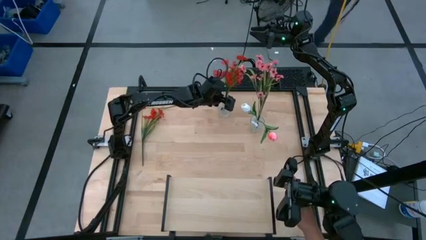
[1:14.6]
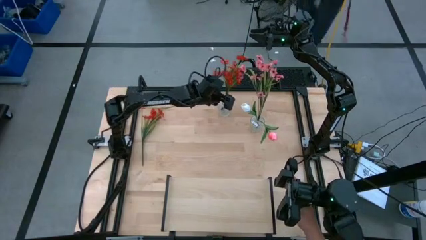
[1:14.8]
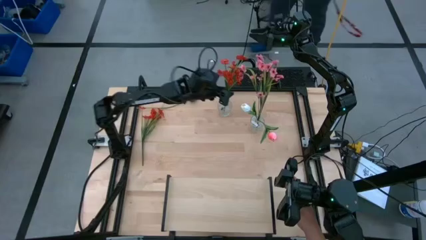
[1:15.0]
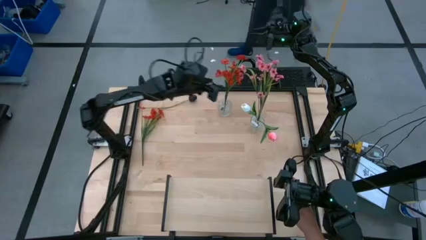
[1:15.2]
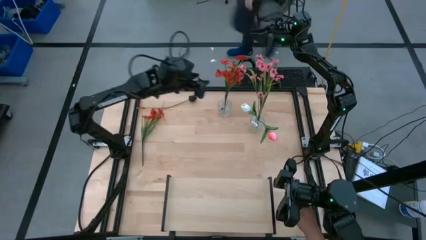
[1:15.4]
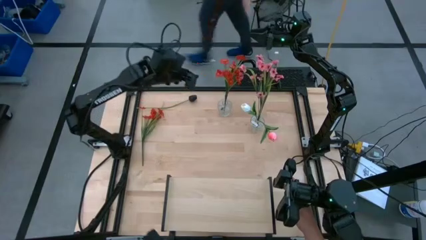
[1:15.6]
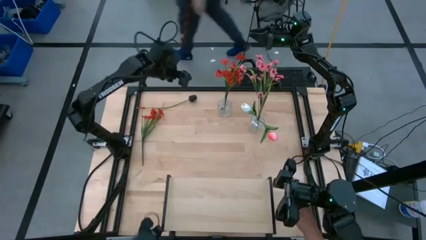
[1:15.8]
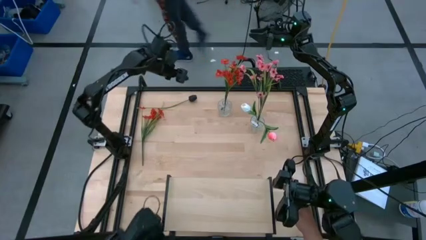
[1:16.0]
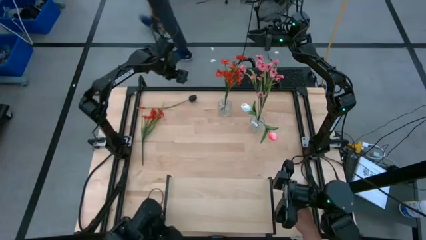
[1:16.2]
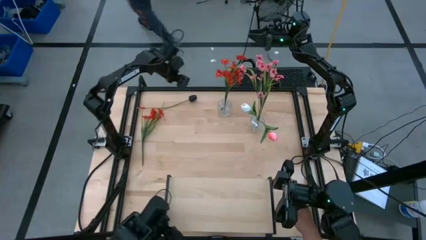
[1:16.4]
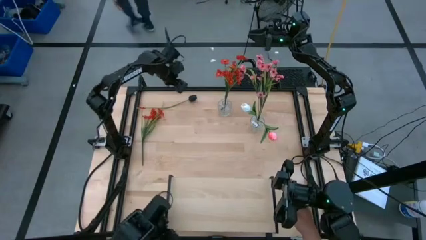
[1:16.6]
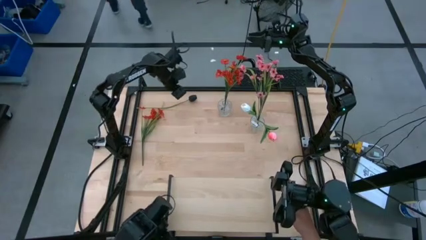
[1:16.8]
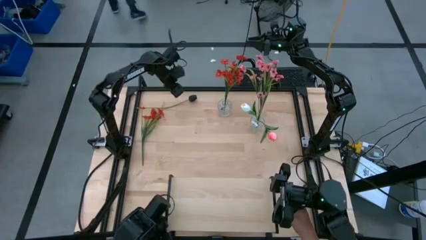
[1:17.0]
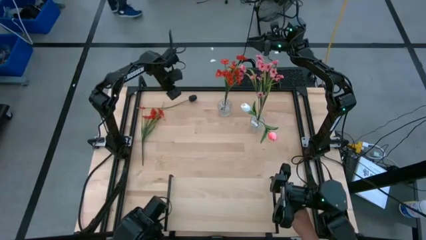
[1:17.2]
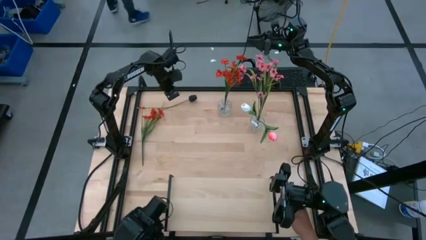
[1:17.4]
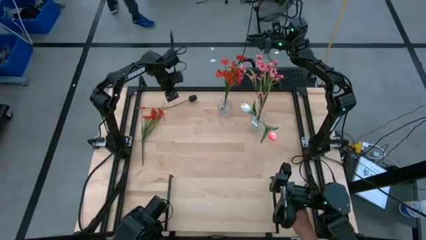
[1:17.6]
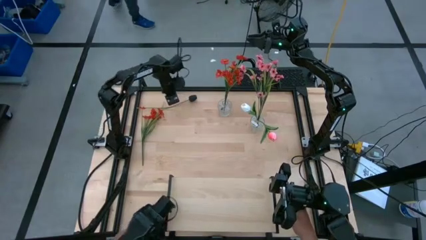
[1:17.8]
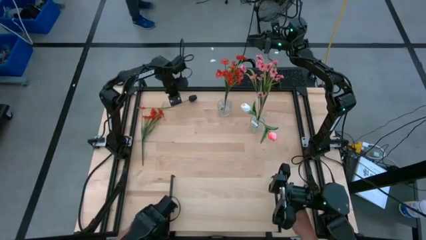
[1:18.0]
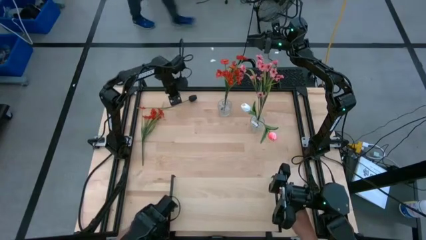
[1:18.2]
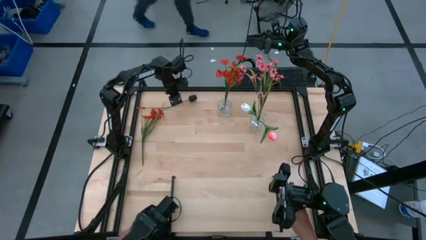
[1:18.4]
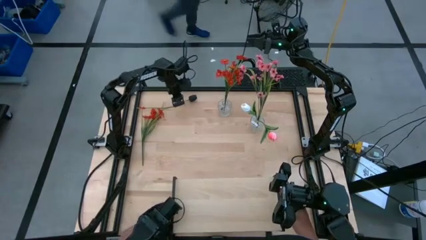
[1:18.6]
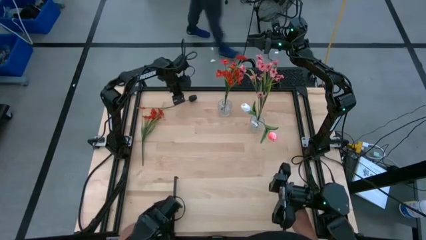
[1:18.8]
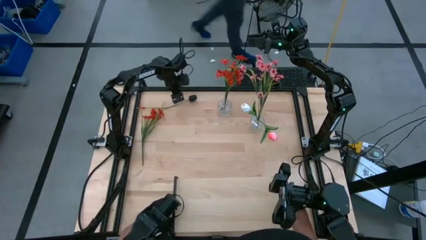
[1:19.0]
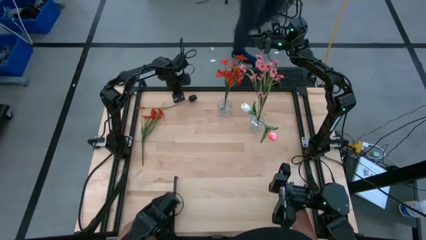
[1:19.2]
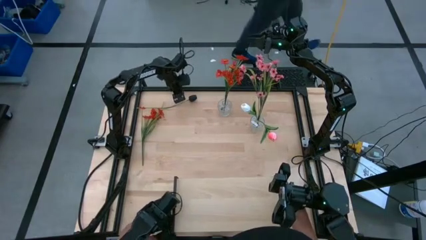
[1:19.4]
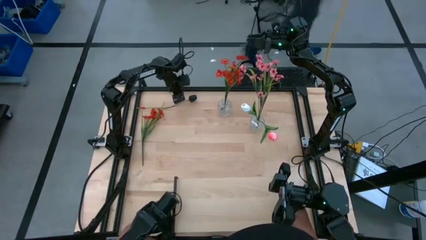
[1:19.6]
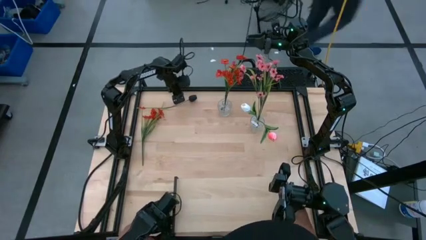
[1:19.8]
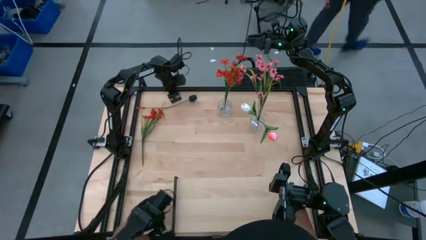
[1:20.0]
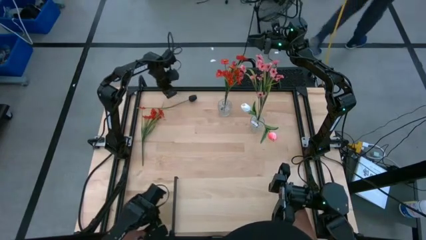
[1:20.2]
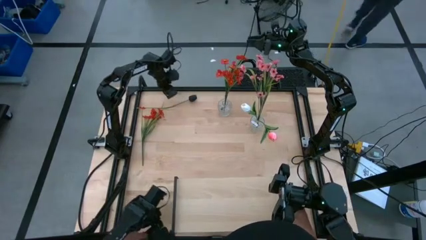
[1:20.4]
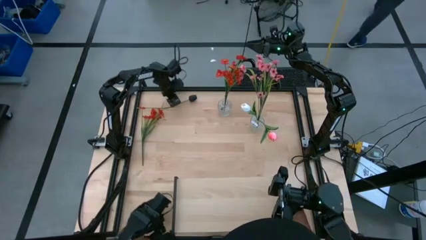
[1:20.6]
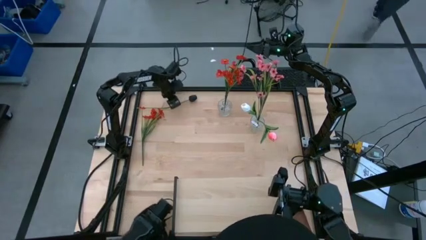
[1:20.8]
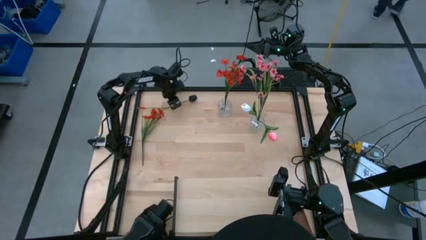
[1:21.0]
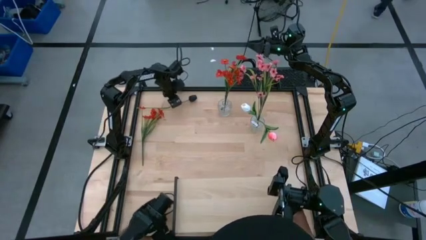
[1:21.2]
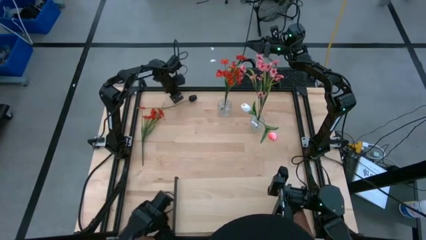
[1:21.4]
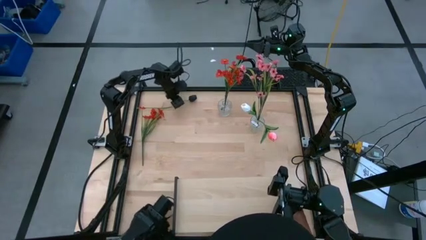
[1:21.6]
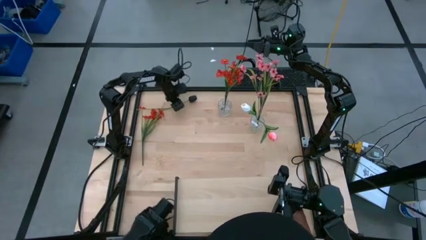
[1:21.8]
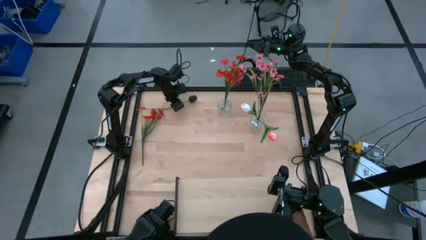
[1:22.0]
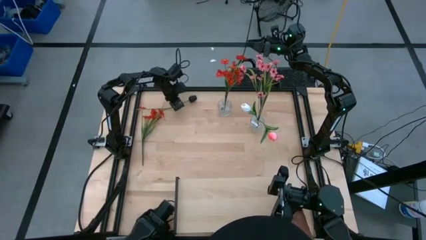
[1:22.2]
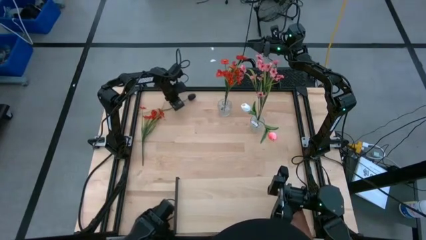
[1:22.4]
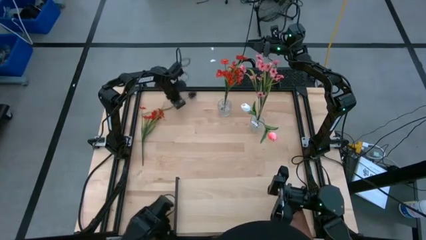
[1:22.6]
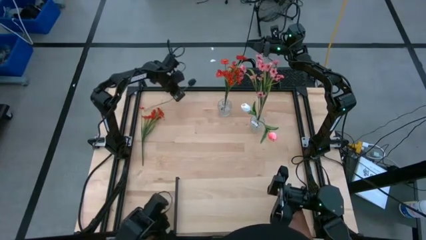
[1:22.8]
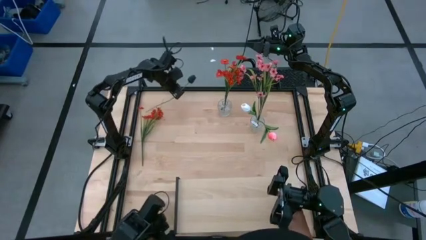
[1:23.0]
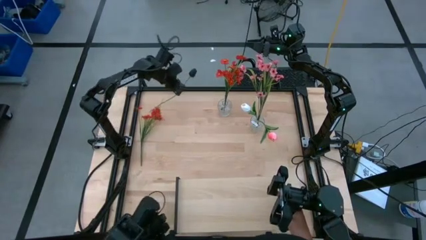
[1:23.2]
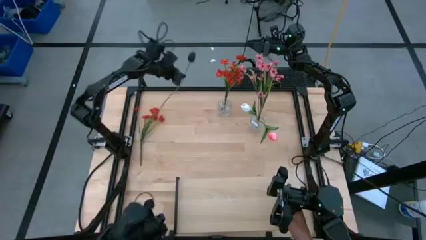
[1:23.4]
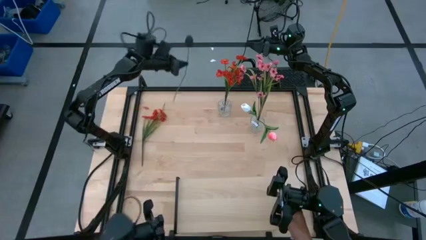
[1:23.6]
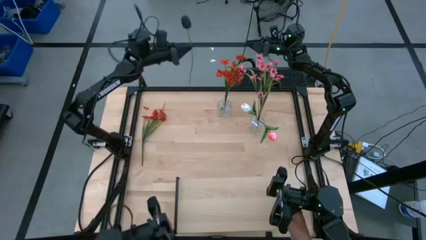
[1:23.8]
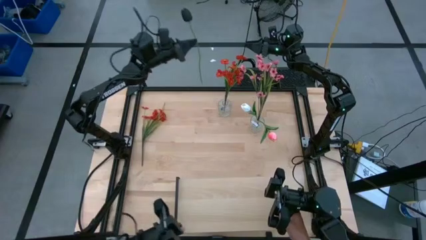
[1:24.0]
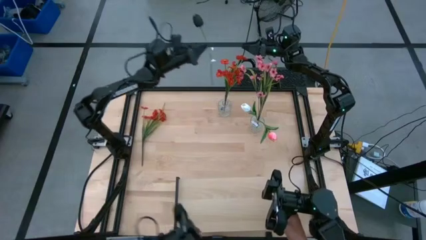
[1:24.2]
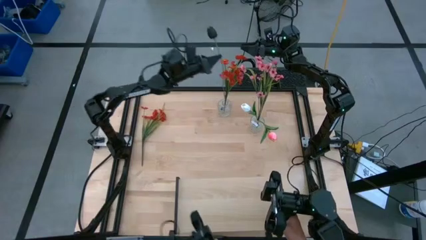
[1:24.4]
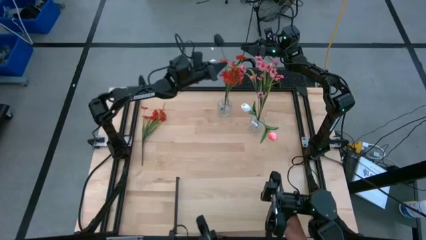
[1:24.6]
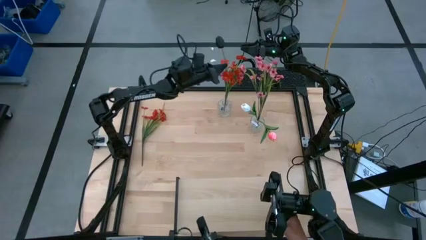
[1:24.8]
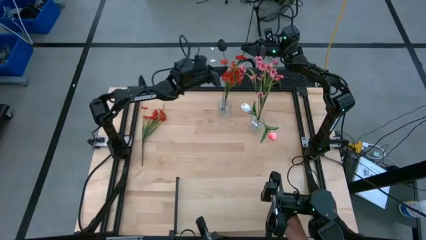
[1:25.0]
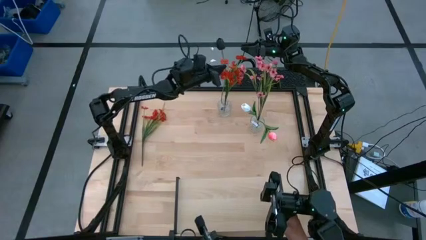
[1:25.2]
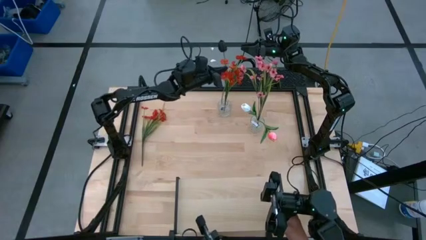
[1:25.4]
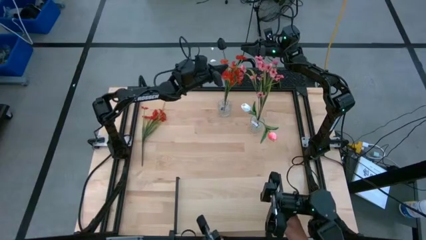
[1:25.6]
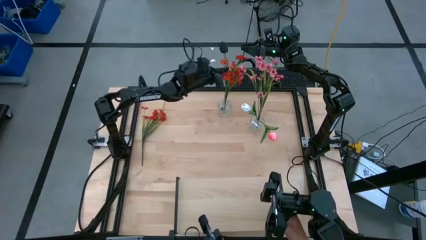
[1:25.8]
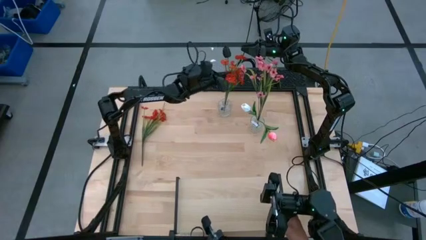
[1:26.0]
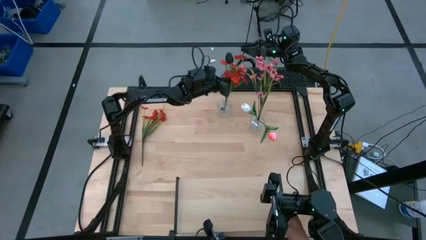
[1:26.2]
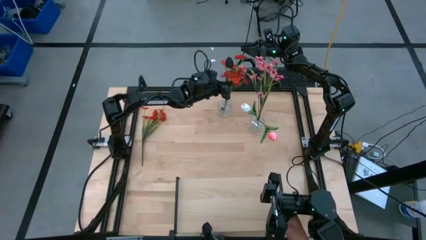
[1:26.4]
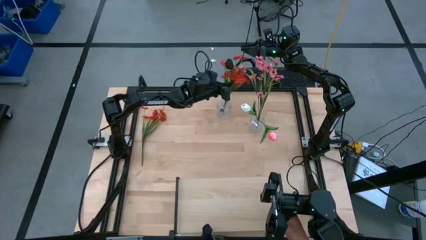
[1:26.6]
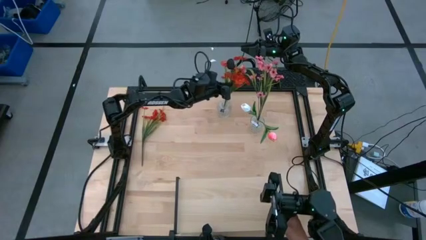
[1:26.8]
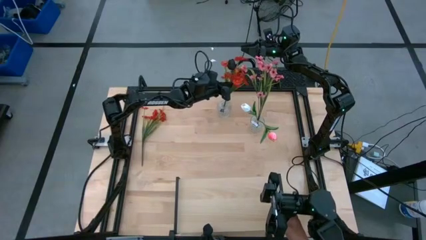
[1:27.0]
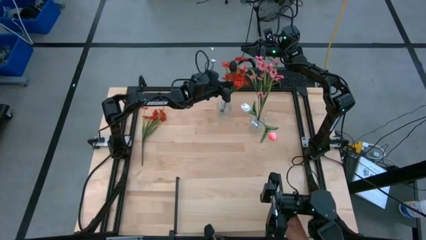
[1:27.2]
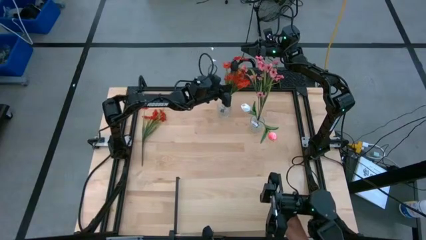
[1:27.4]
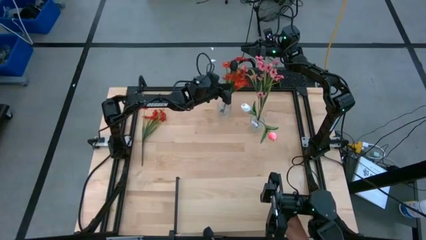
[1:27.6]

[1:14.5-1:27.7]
Task: Pick and place flowers into a vace then onto a shelf
Put the black tulip into the left transparent vase
